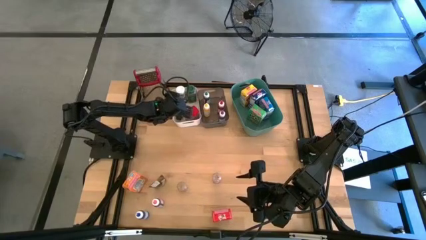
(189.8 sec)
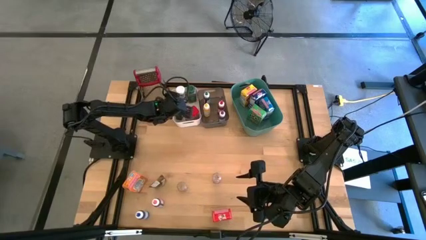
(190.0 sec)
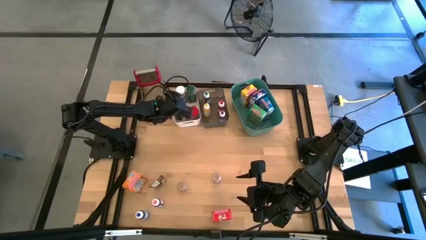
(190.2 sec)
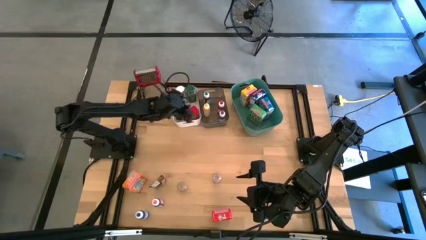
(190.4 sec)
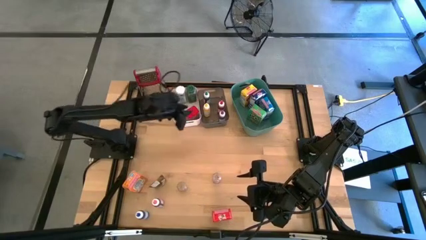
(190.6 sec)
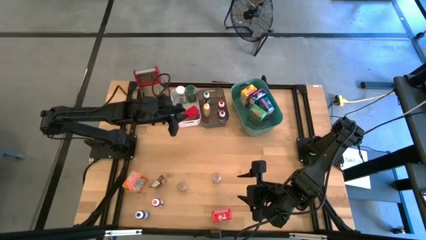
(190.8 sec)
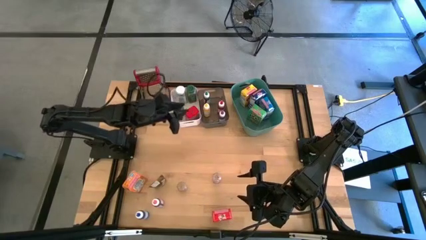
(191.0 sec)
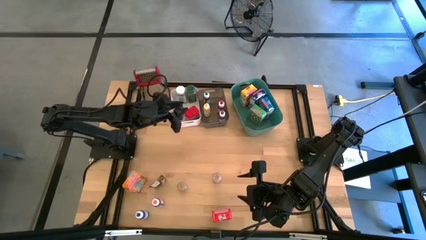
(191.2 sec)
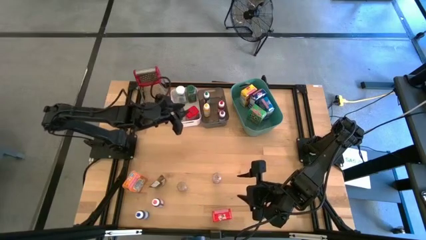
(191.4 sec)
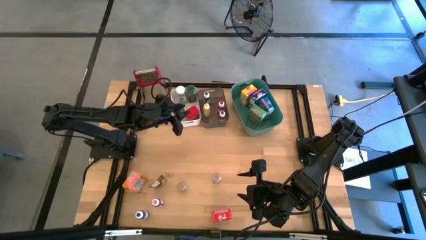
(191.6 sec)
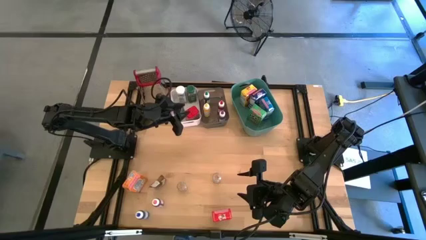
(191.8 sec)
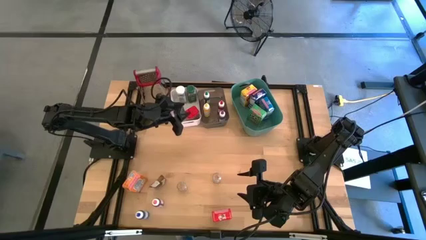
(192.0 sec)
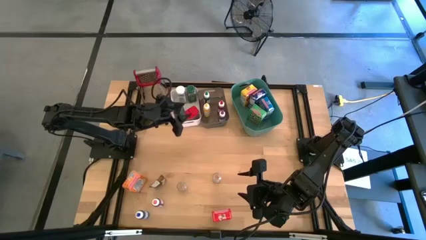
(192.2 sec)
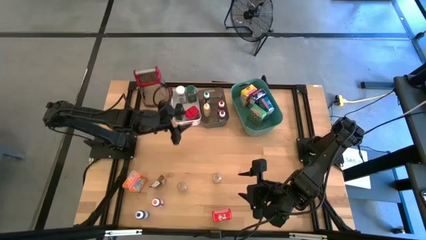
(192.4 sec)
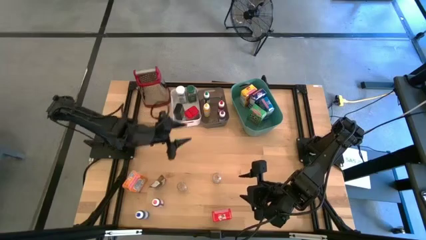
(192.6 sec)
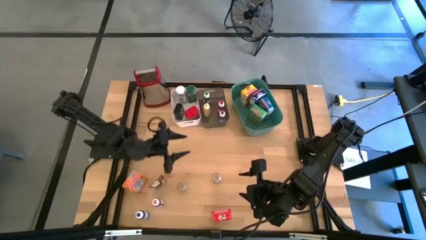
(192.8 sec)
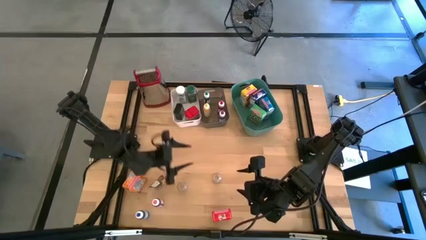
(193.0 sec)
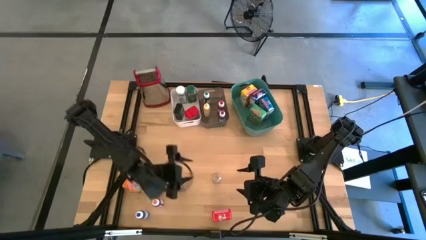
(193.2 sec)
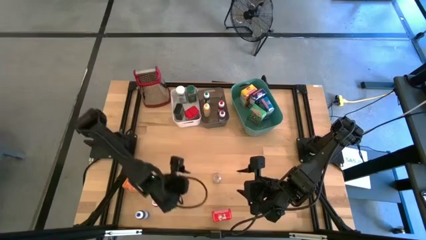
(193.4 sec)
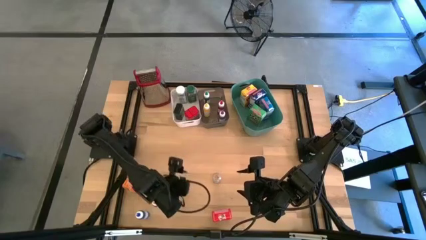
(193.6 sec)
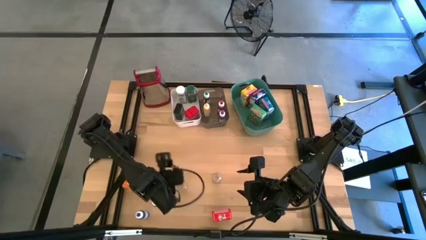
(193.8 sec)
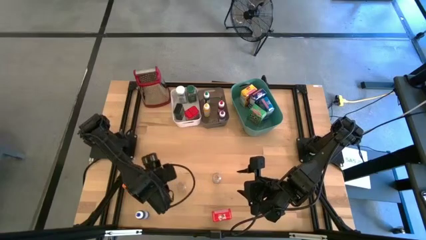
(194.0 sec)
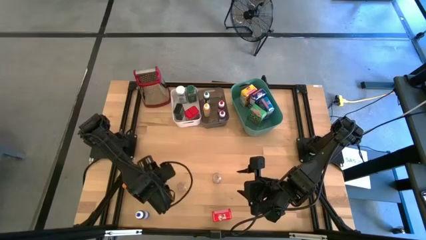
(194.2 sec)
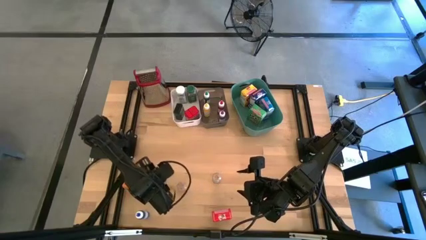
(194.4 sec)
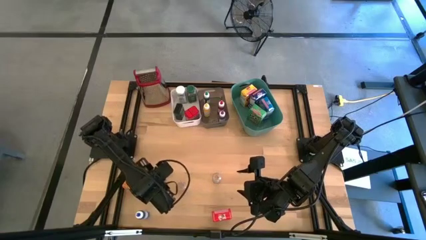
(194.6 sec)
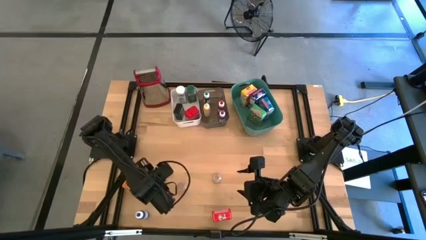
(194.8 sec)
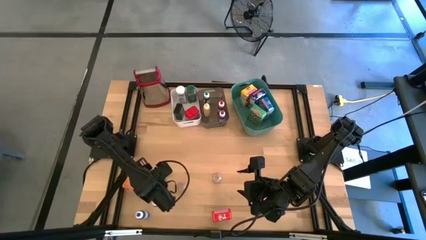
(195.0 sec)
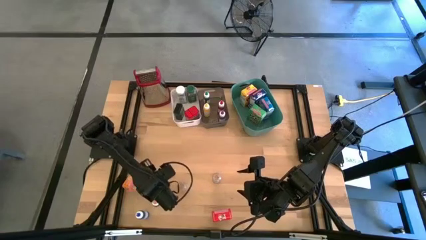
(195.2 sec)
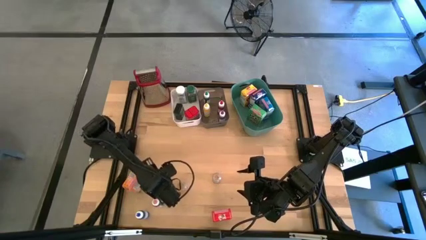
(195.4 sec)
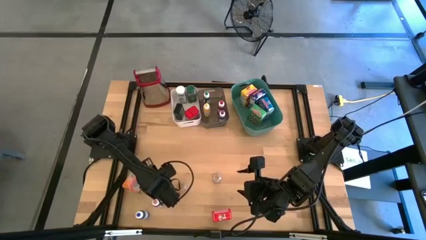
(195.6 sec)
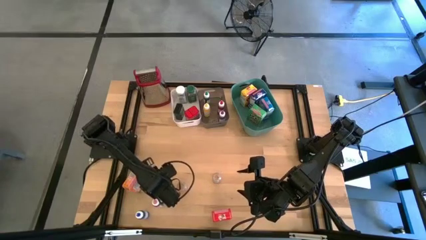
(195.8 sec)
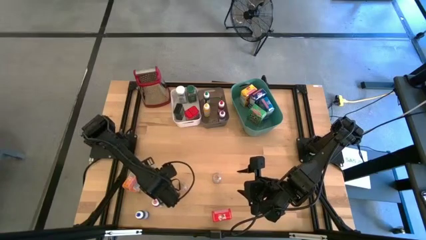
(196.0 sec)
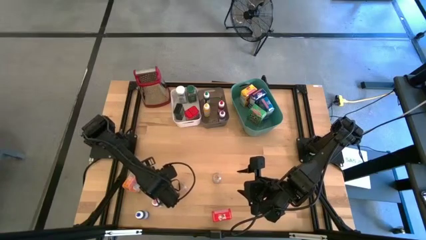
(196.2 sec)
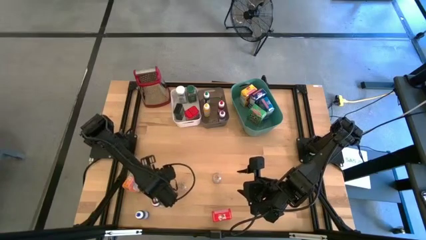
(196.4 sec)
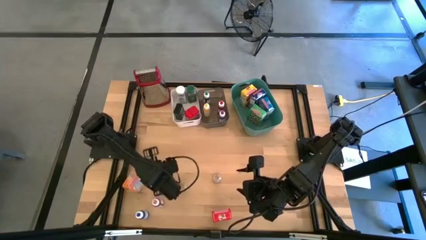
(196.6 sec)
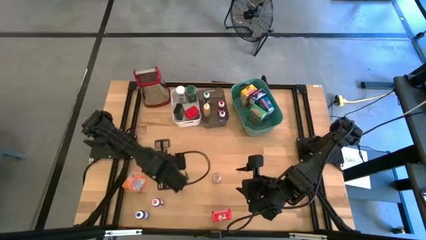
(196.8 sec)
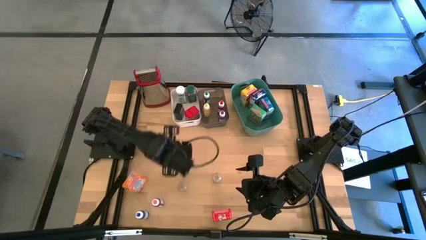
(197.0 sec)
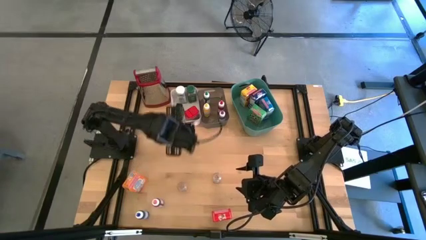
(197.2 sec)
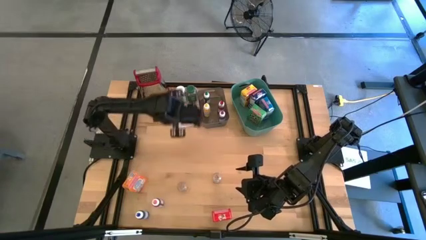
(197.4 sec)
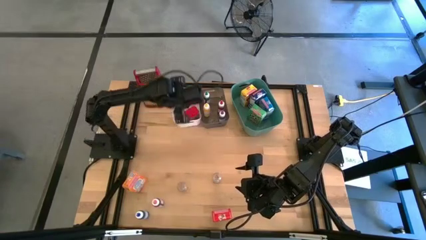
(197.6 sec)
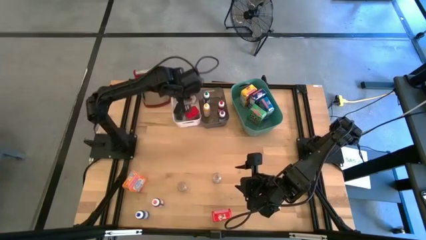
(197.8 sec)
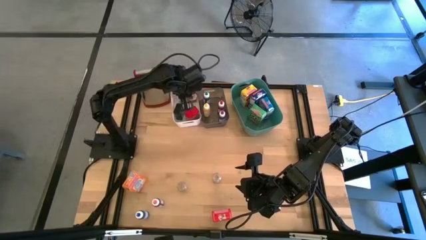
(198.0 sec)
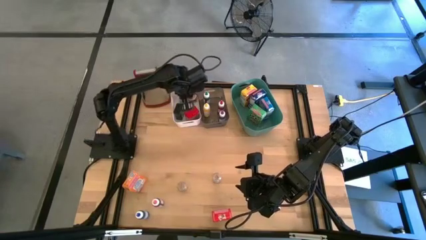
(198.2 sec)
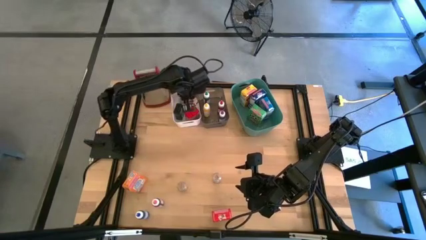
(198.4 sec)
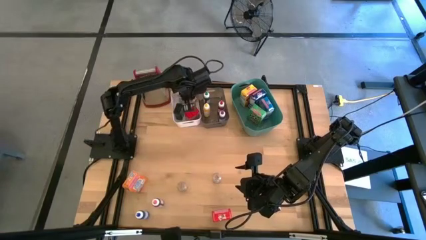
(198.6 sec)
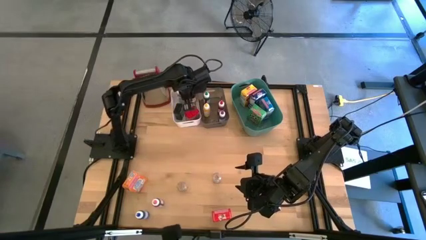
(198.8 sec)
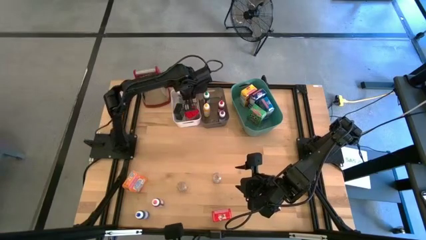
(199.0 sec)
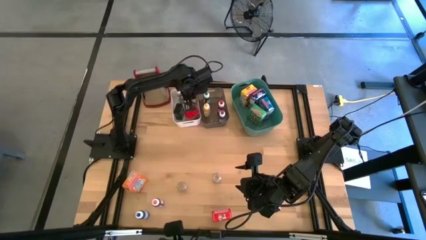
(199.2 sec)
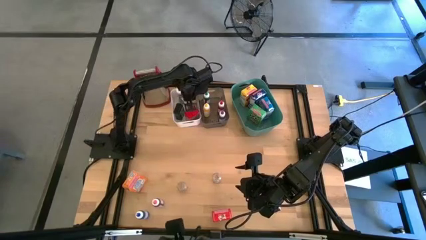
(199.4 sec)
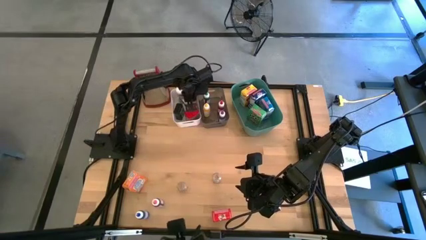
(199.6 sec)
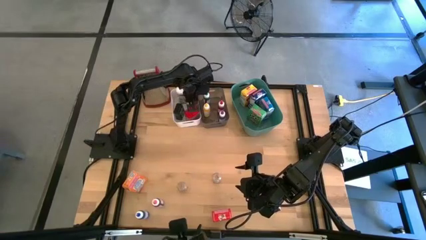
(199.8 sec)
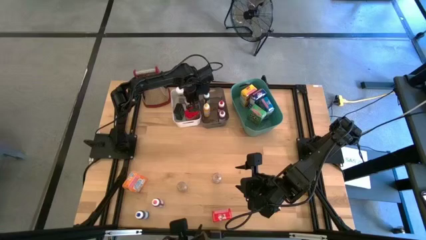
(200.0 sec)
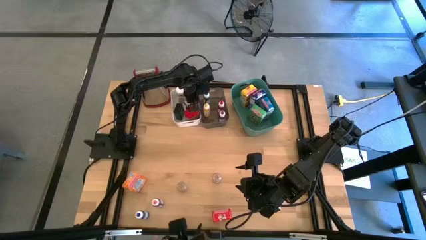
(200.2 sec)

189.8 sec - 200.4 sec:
Task: Pick & Place Kitchen Items
Put the orange spice pack into the left white bin

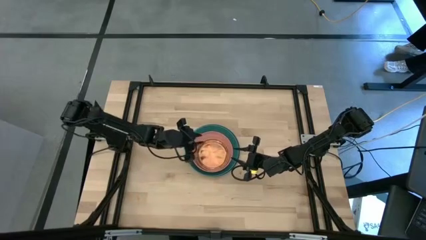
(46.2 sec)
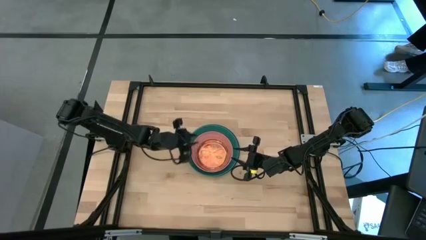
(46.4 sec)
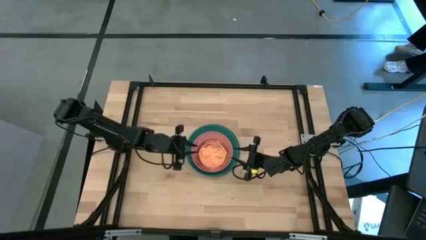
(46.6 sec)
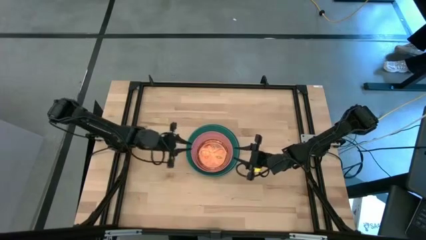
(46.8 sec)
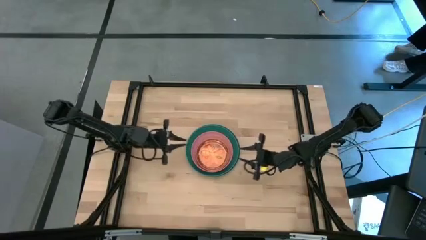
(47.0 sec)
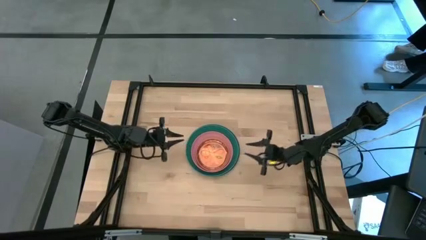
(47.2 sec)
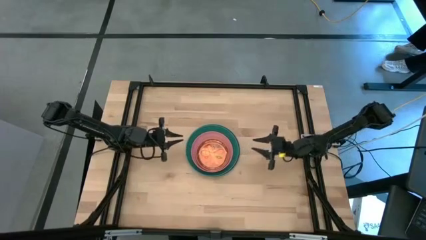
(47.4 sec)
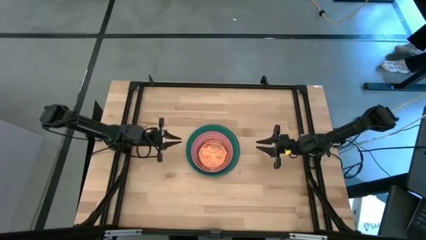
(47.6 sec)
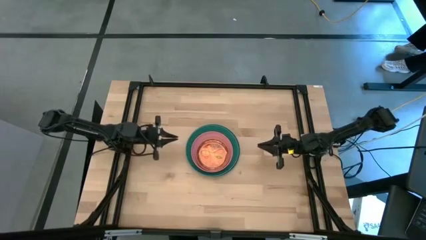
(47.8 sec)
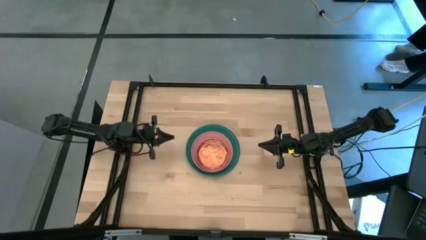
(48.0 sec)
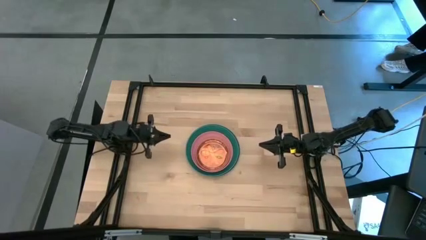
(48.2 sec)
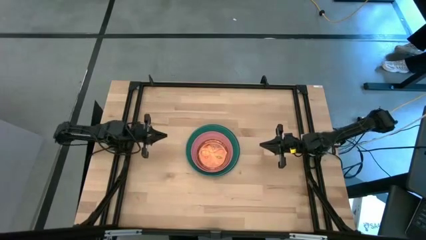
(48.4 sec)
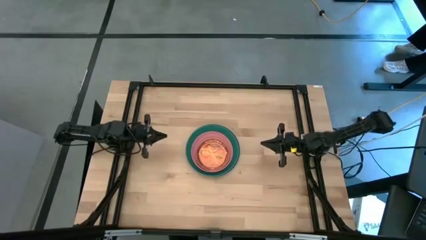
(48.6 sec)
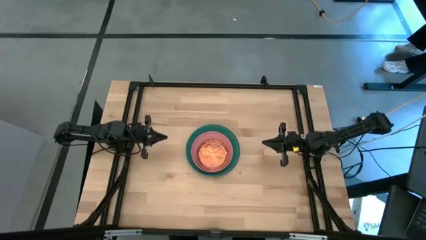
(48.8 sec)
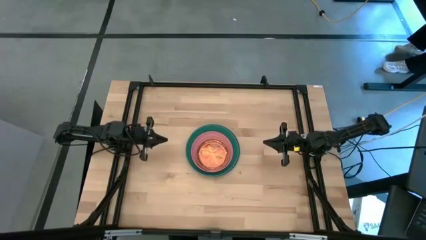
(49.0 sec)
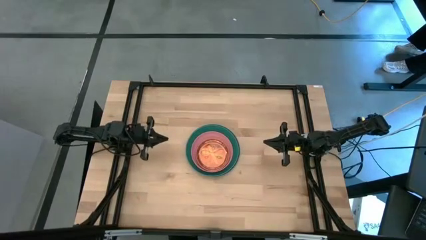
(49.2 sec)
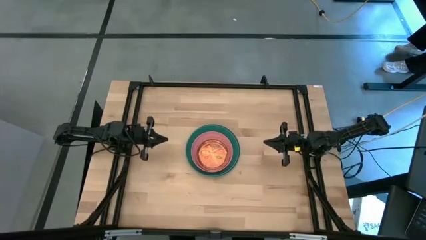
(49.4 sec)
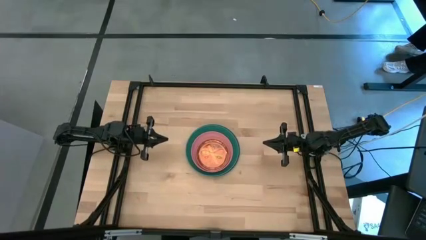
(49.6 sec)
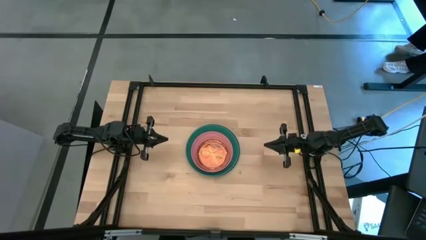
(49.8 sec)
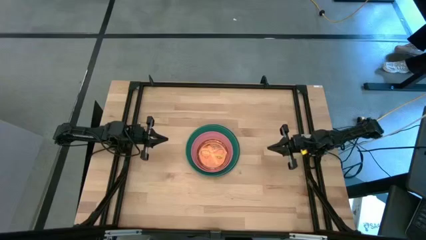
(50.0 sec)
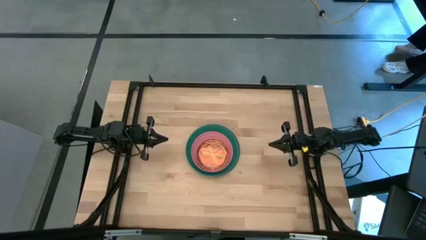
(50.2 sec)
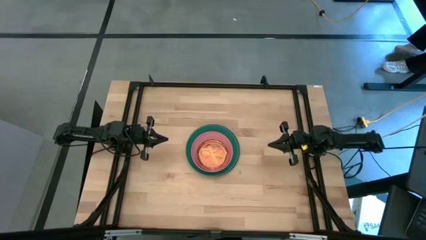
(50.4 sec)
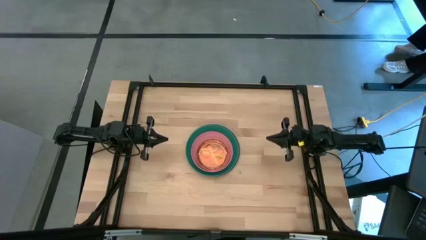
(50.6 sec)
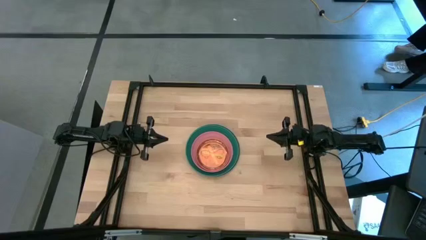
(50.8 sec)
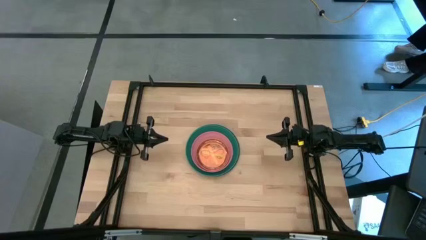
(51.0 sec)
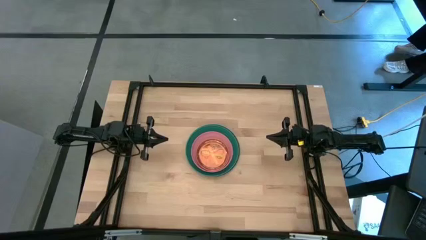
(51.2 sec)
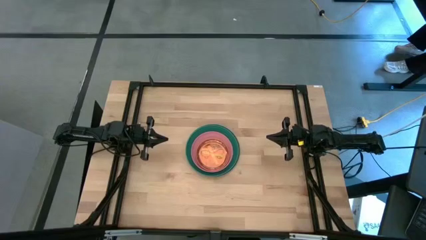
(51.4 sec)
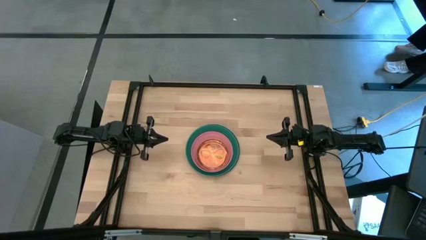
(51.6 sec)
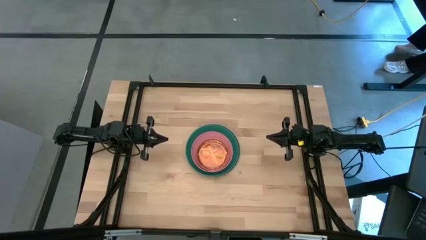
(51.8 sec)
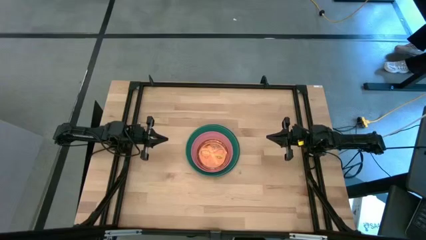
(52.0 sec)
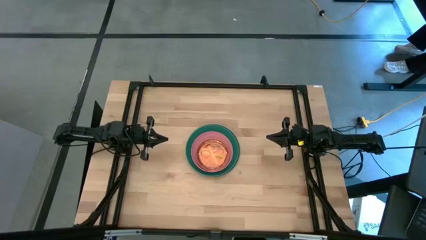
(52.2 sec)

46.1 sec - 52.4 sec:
Task: Stack plastic plates
Return to Home Position
